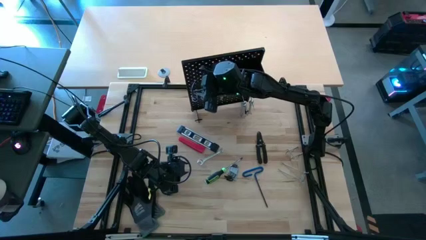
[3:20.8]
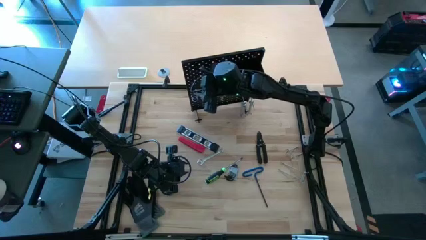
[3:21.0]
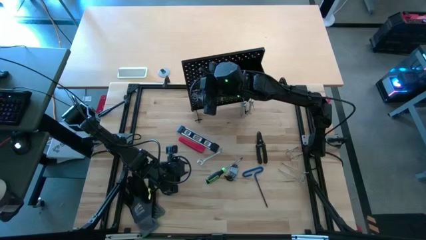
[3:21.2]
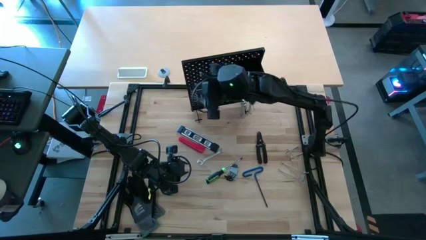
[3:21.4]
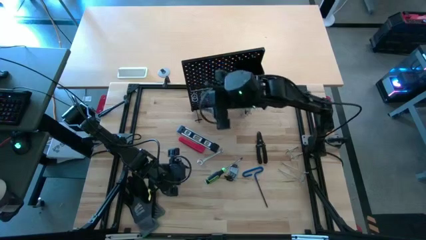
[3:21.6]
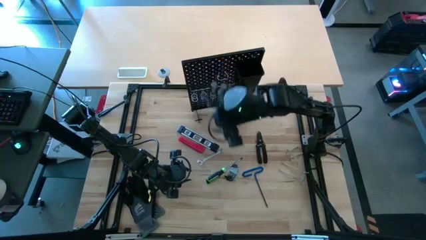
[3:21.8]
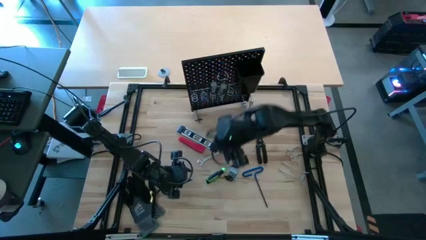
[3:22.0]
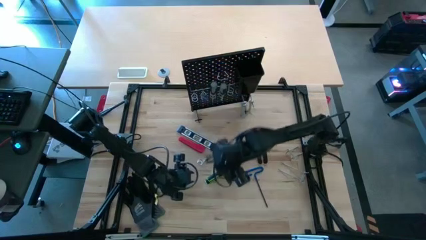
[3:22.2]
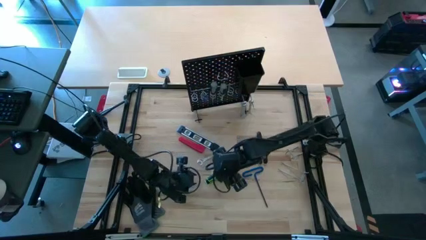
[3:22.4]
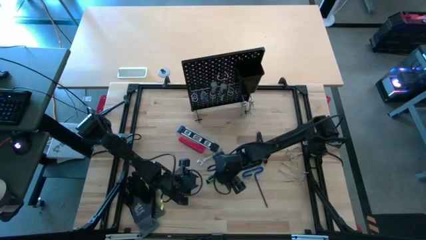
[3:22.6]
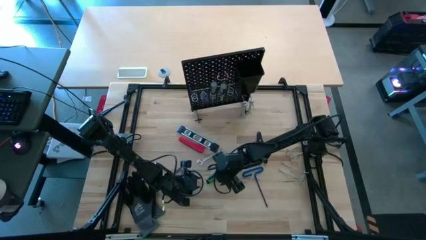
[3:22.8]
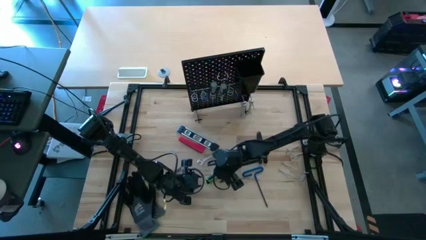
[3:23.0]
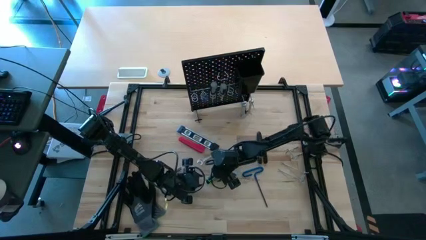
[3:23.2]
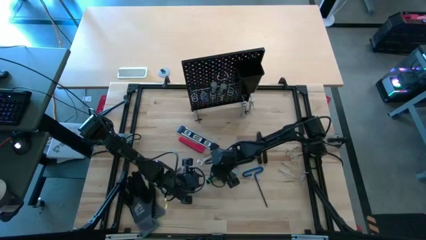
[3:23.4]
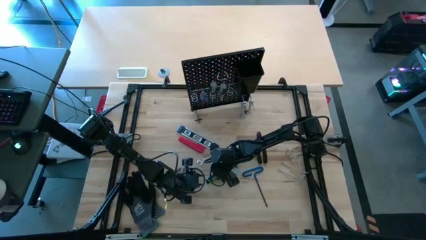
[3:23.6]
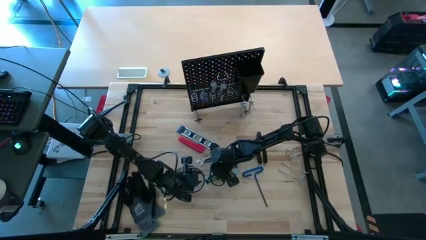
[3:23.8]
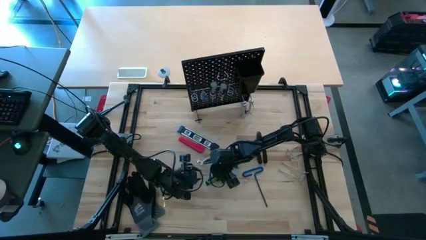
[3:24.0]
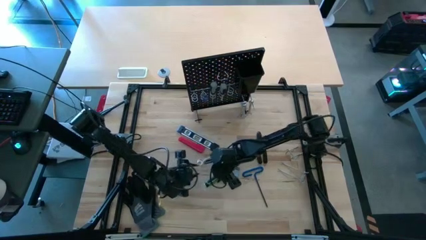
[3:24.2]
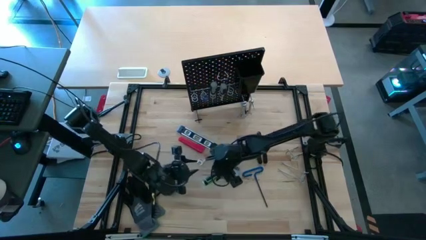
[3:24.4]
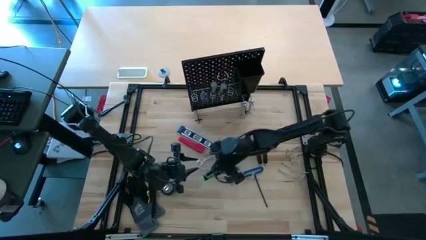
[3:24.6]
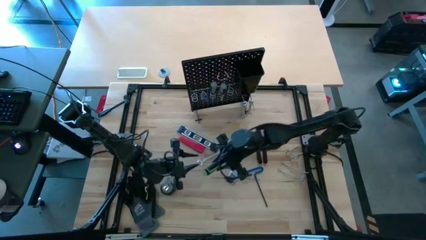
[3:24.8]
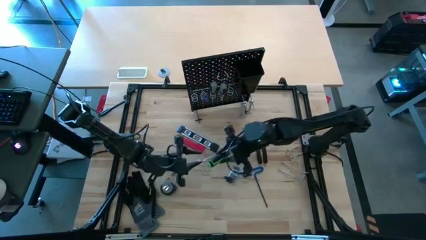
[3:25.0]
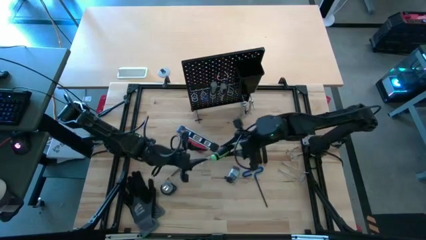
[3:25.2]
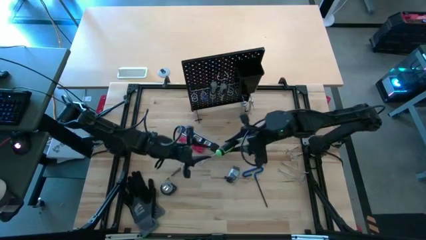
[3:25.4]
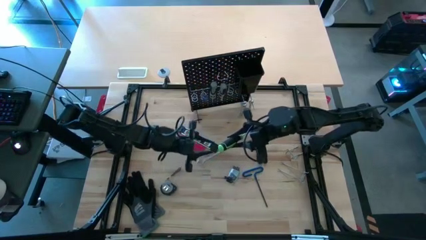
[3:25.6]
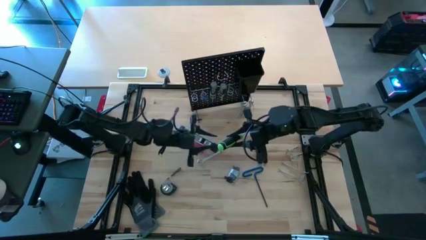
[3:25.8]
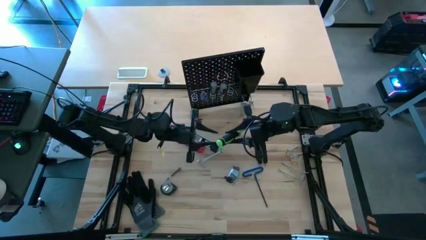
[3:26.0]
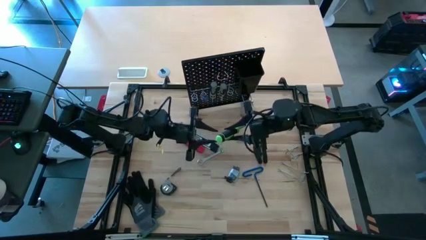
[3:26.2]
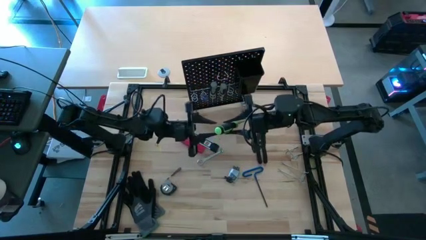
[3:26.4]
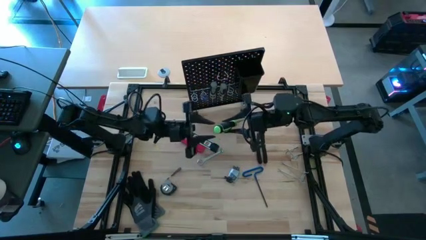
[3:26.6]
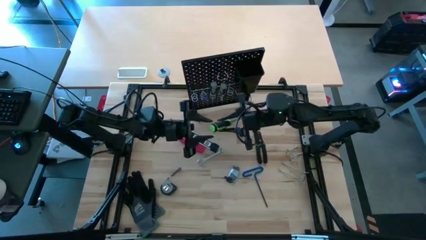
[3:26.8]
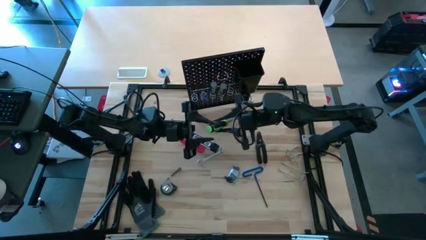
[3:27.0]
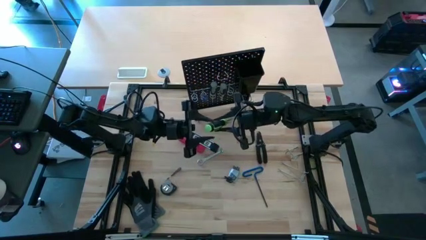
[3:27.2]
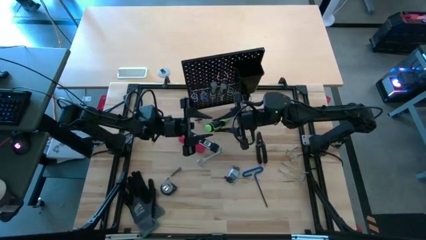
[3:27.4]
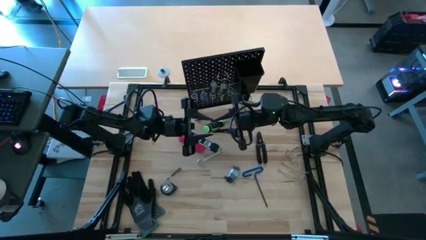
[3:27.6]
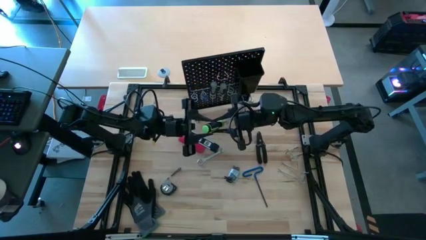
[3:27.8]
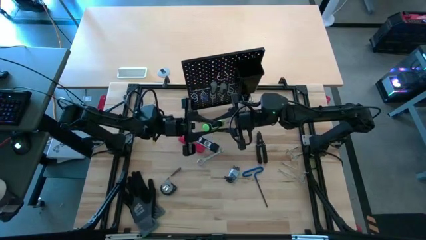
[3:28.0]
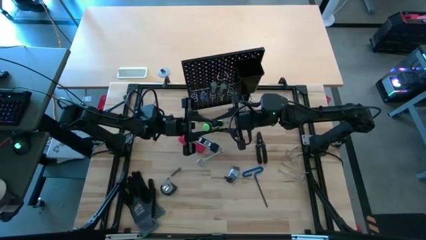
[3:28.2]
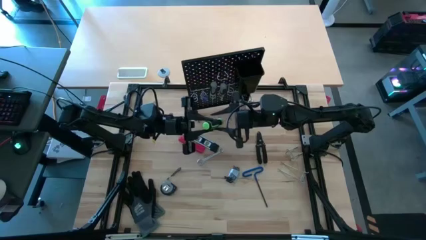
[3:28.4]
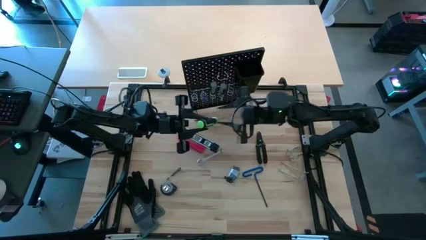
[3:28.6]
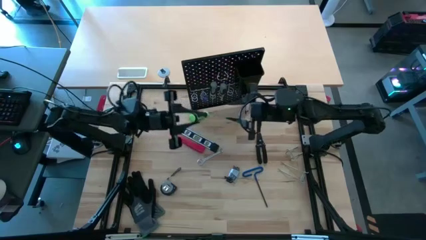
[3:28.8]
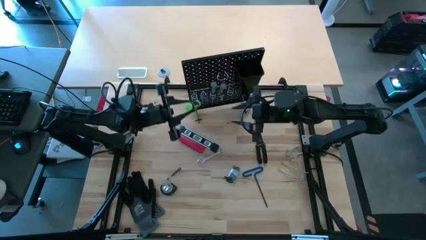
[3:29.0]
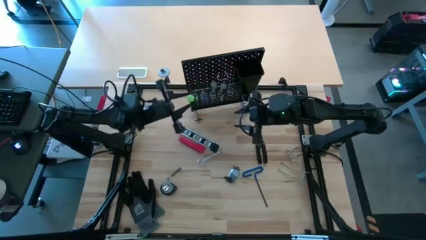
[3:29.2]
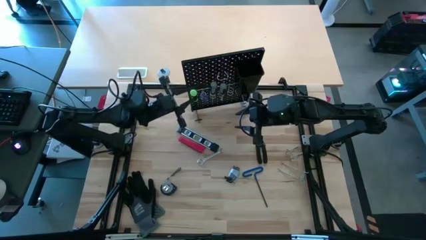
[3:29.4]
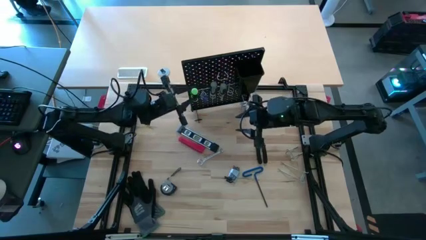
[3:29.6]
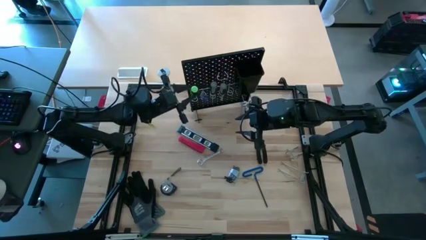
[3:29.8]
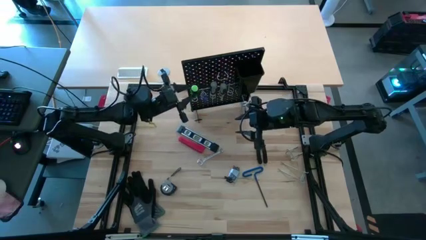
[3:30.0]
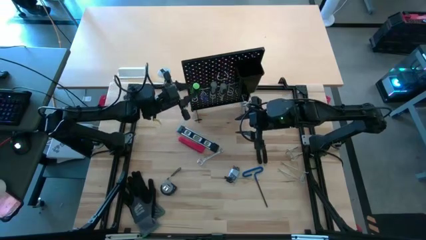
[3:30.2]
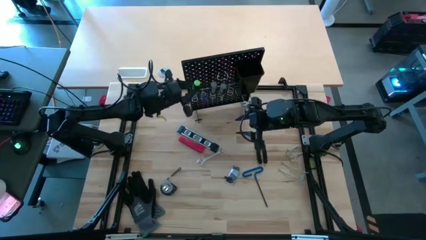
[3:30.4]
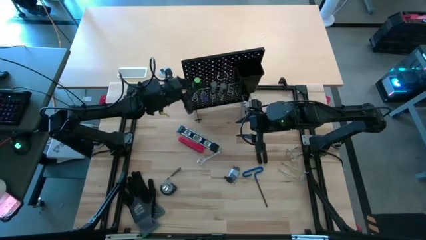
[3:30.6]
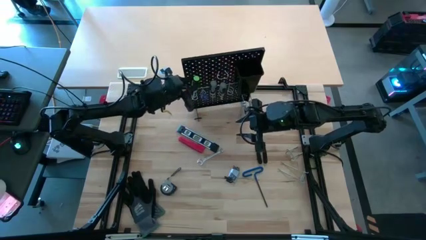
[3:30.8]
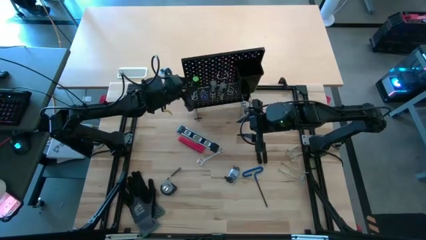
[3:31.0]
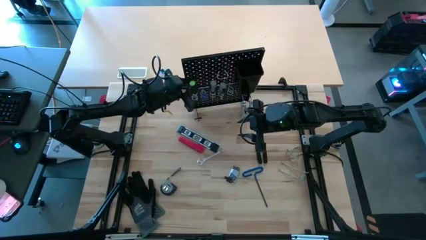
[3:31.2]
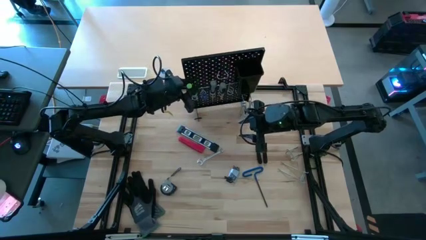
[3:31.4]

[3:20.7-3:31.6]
Task: Hang tools onto peg board
Hang the green screwdriver onto the pegboard

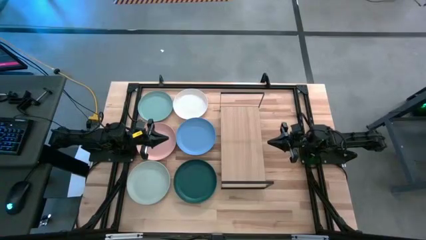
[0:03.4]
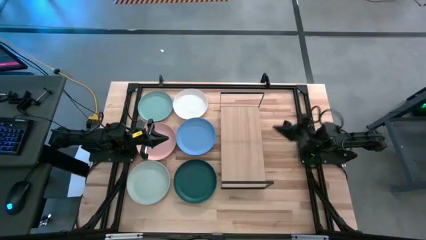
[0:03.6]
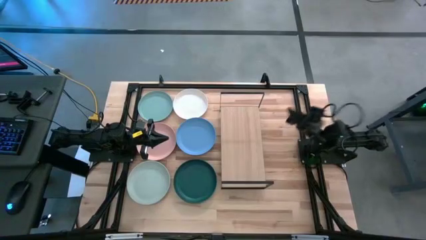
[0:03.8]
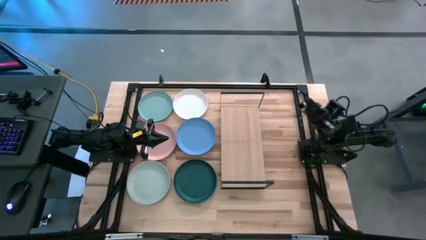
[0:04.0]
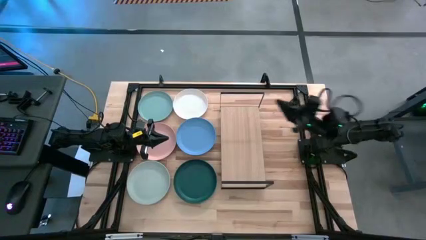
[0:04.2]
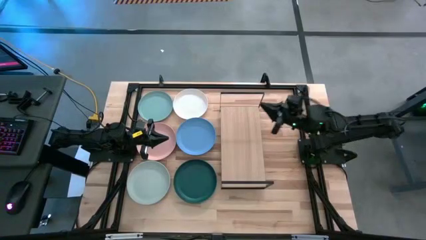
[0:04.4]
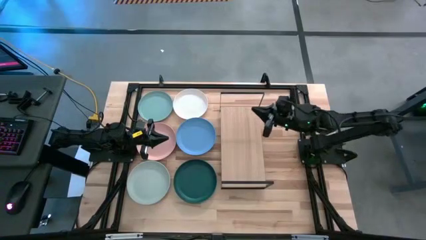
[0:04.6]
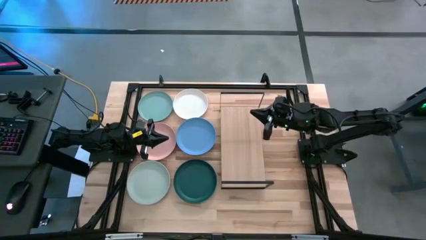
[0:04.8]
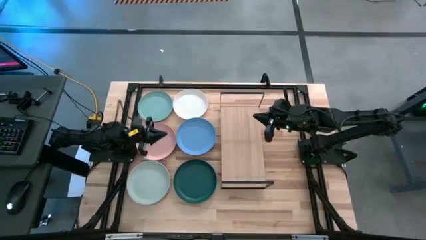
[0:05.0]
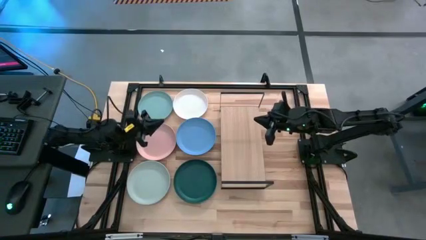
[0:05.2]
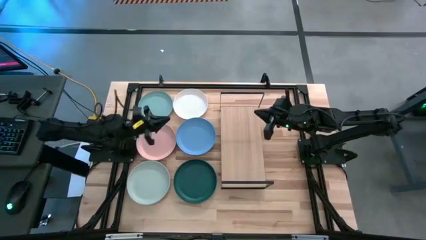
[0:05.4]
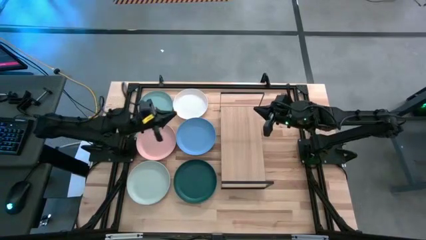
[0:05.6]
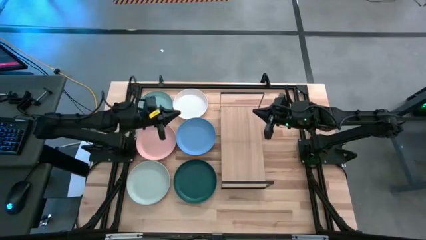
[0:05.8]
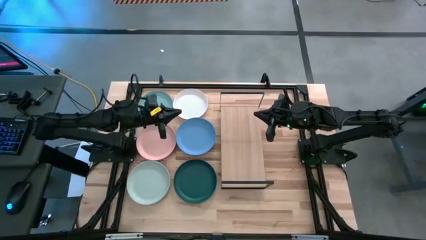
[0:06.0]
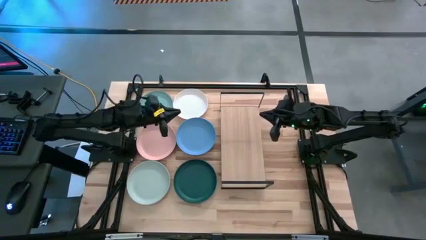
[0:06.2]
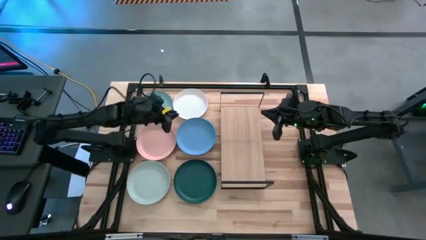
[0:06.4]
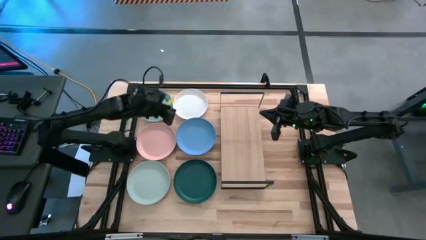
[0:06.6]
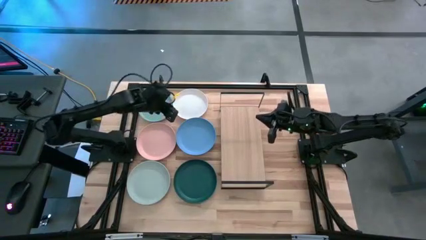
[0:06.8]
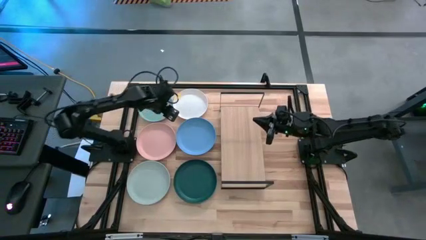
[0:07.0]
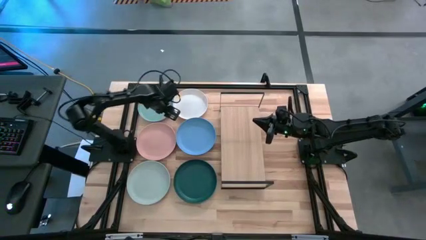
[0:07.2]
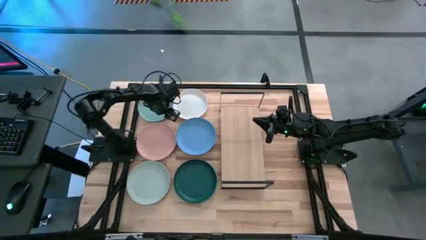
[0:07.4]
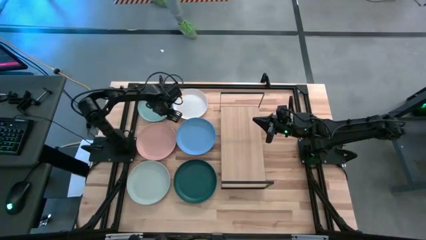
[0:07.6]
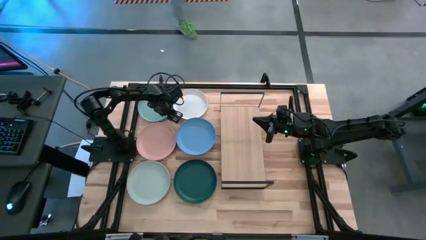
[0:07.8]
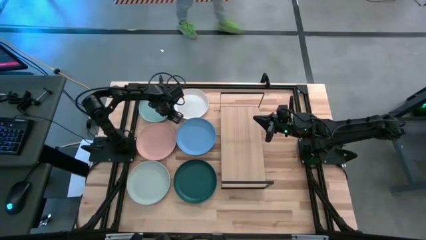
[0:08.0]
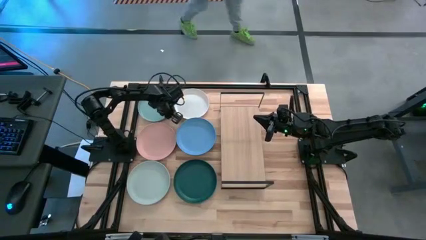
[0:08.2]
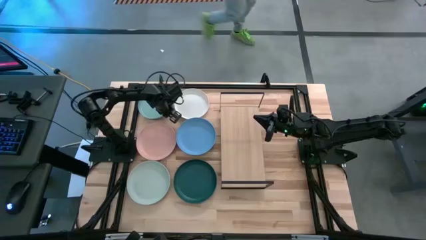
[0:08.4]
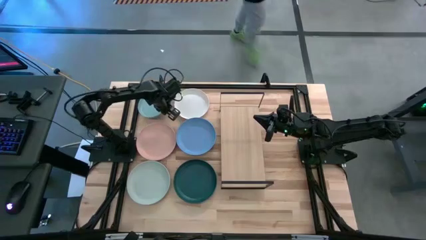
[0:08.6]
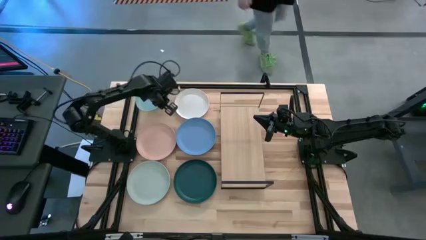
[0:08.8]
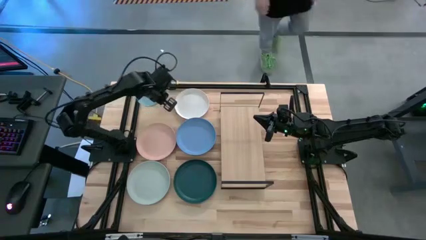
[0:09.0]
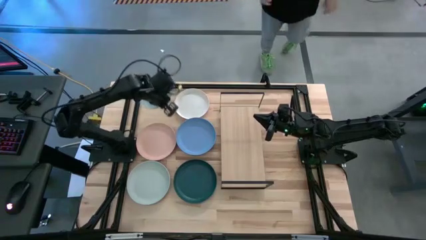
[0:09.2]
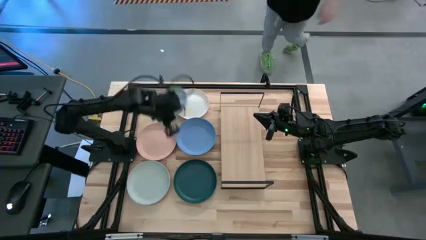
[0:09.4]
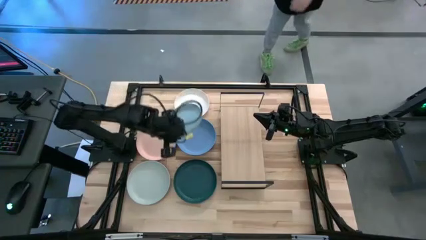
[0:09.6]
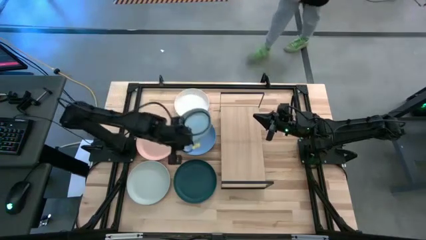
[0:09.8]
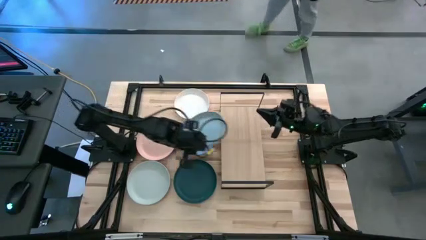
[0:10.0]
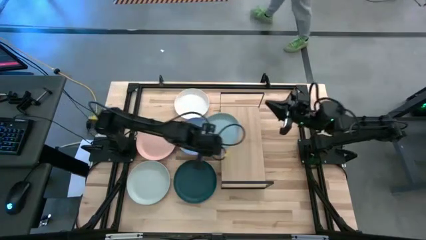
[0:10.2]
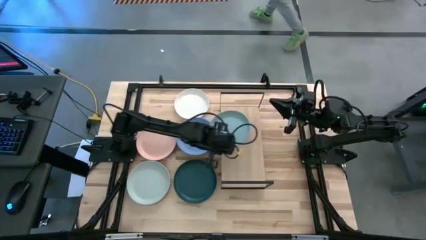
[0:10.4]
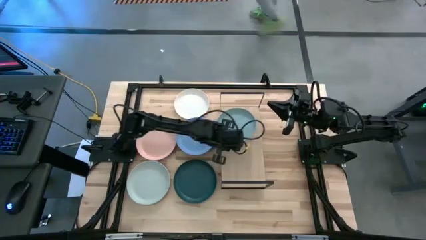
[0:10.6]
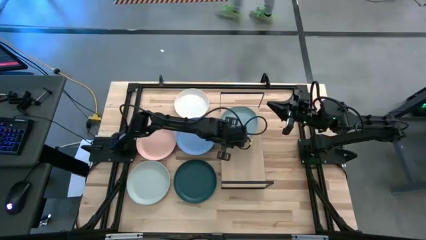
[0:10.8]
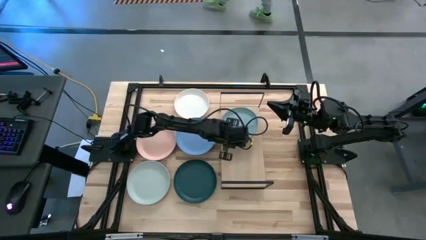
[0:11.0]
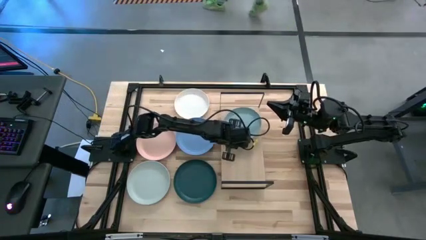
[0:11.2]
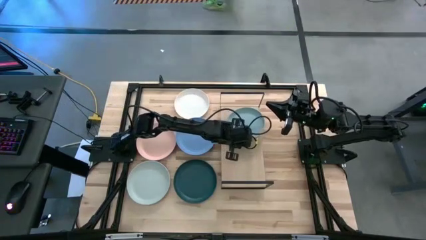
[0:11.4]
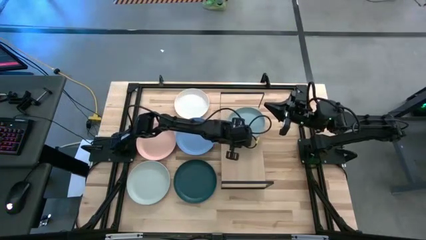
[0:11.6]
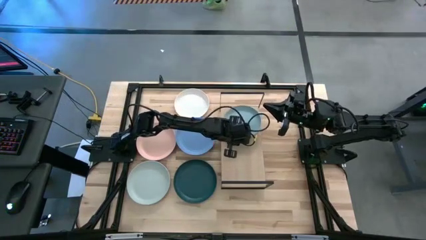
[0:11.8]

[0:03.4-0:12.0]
Task: Place and stack plates onto a shelf
Put the light blue plate on the shelf
